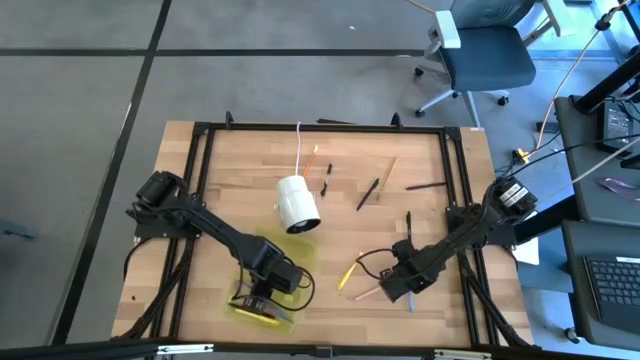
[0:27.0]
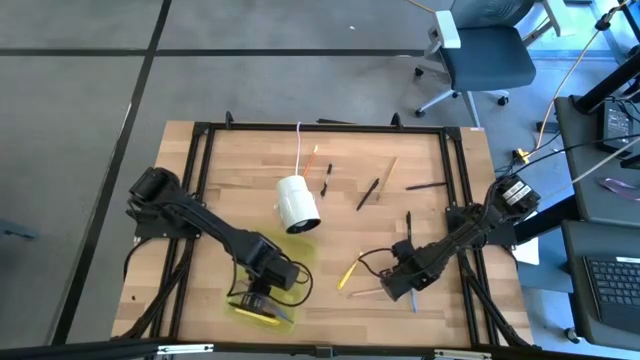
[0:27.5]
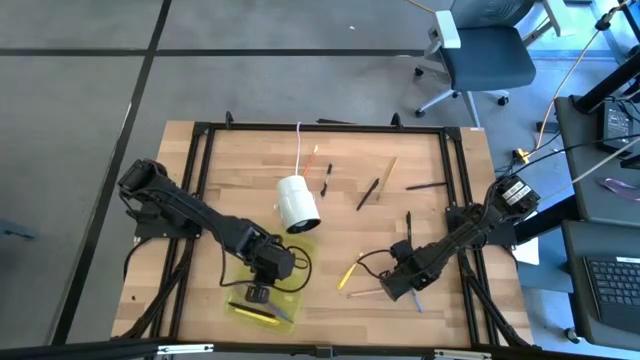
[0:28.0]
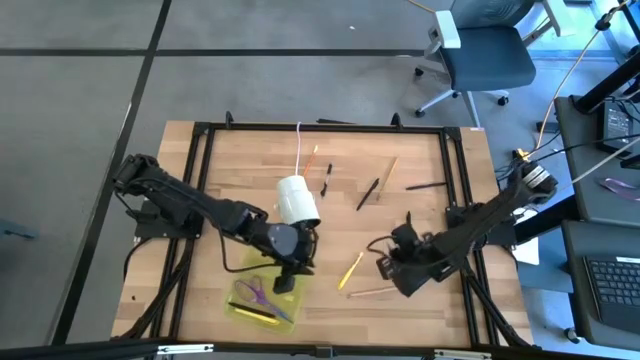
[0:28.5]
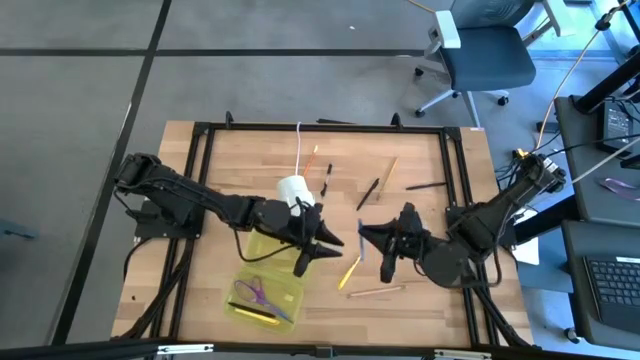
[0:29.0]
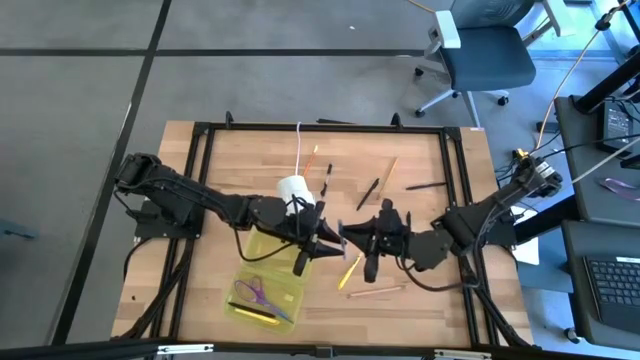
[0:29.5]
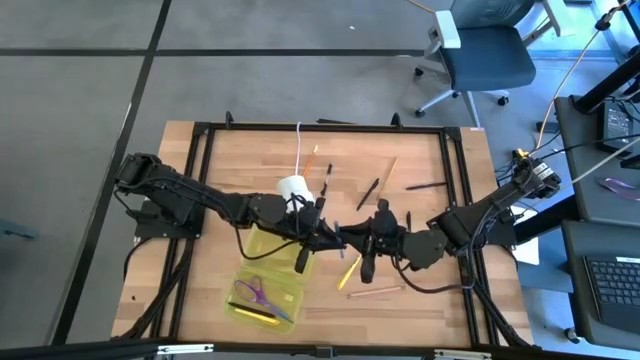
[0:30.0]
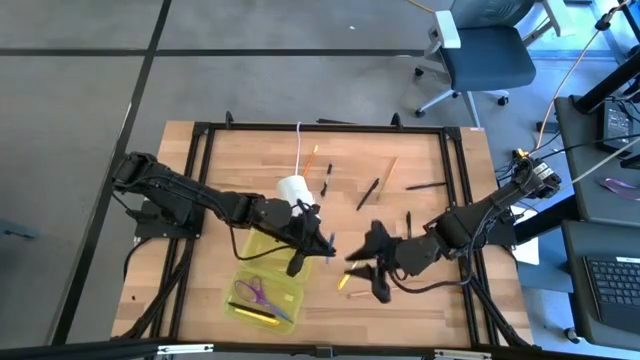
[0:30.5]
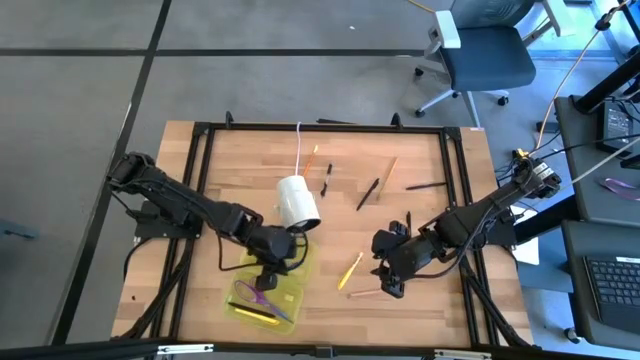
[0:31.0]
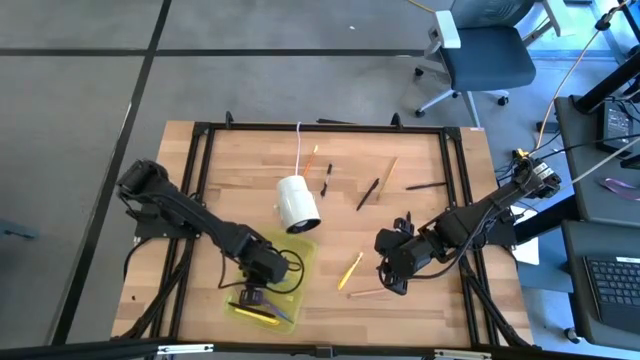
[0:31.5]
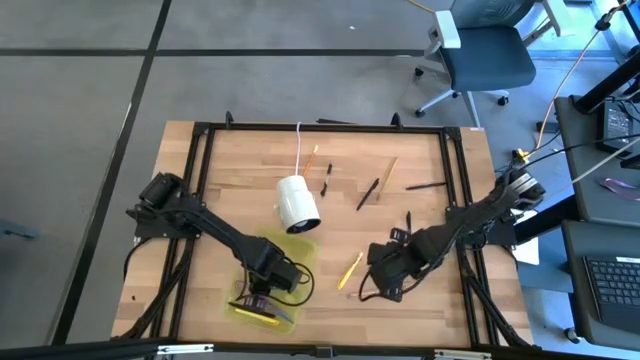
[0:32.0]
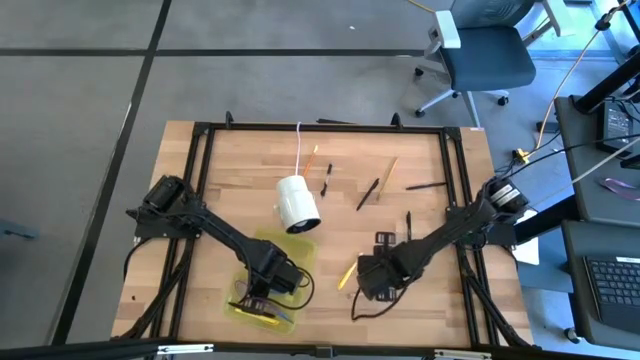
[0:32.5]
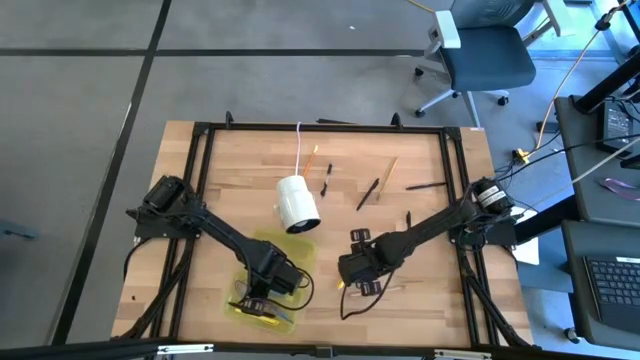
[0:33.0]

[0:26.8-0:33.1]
Task: Pick & place school supplies into a supply box
Put the blue pen into the supply box

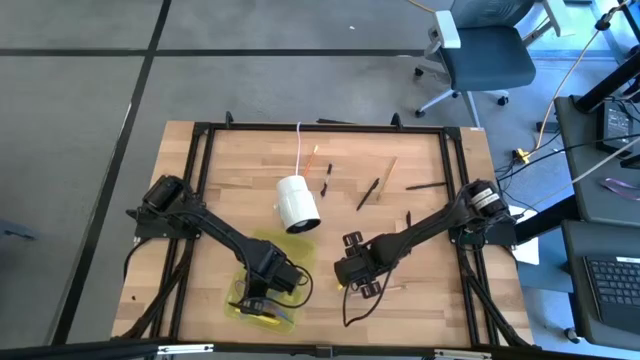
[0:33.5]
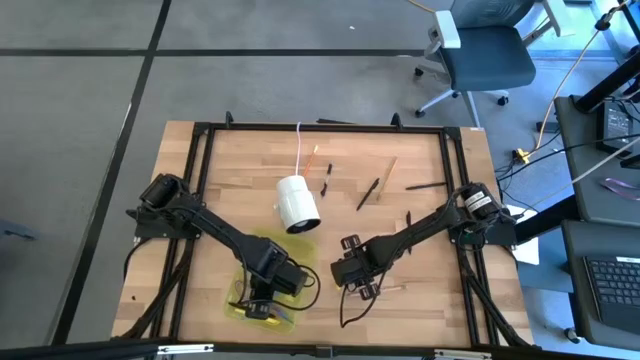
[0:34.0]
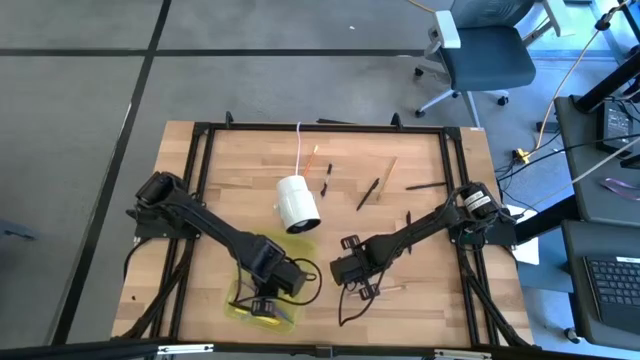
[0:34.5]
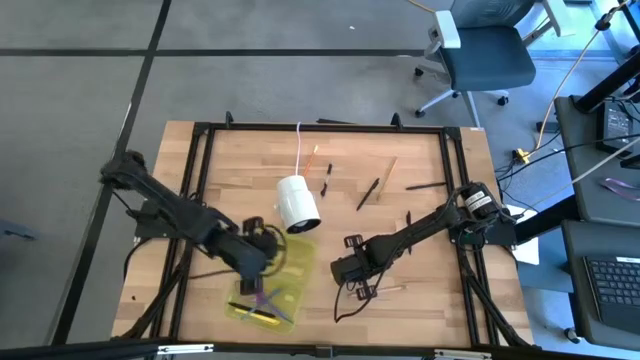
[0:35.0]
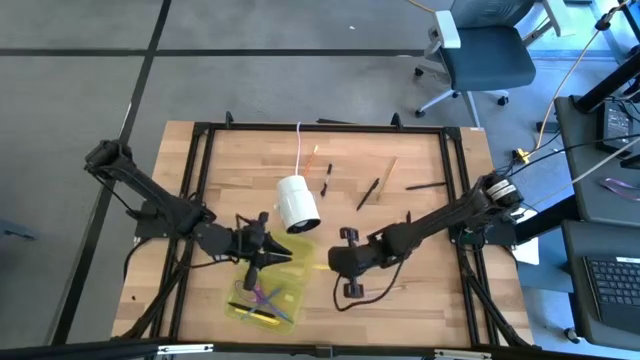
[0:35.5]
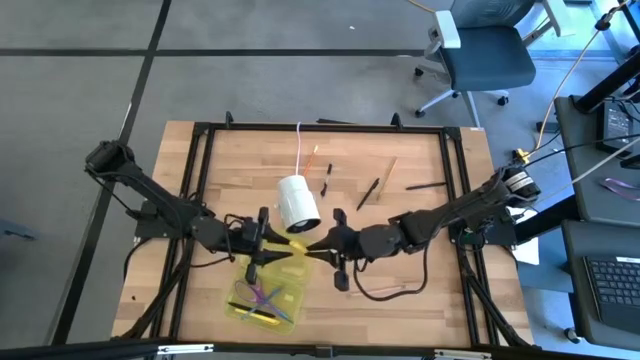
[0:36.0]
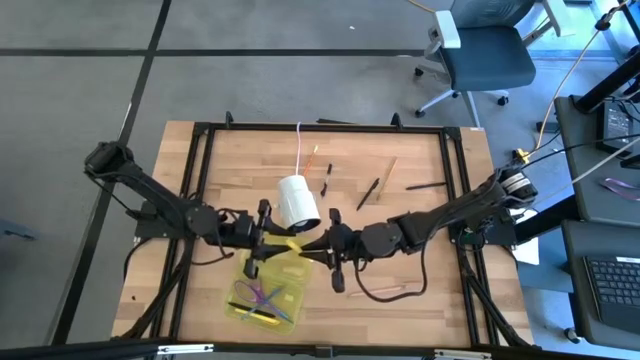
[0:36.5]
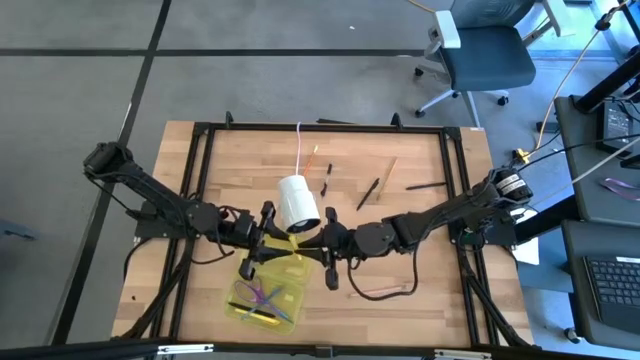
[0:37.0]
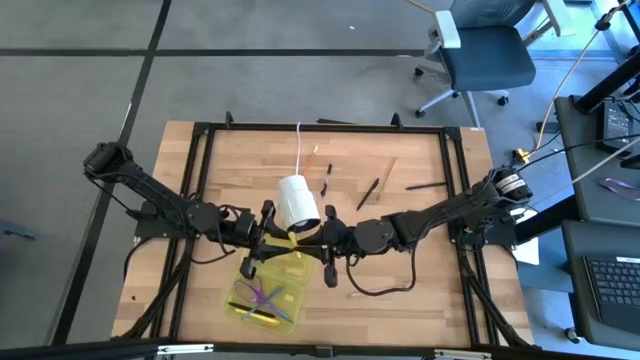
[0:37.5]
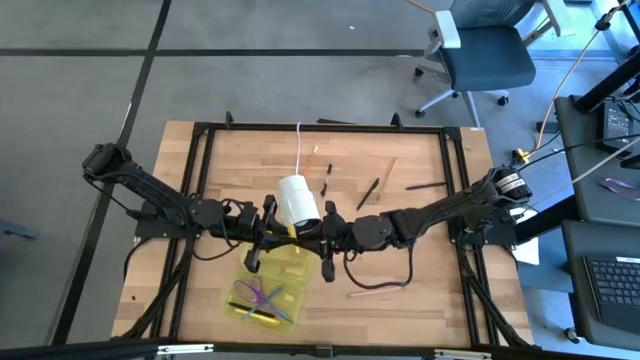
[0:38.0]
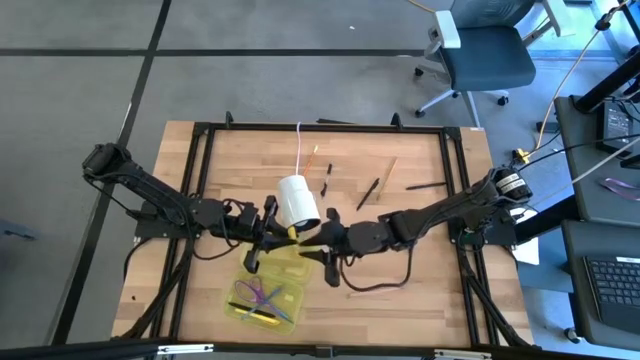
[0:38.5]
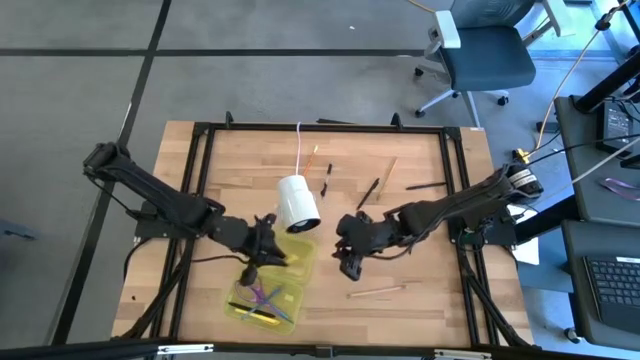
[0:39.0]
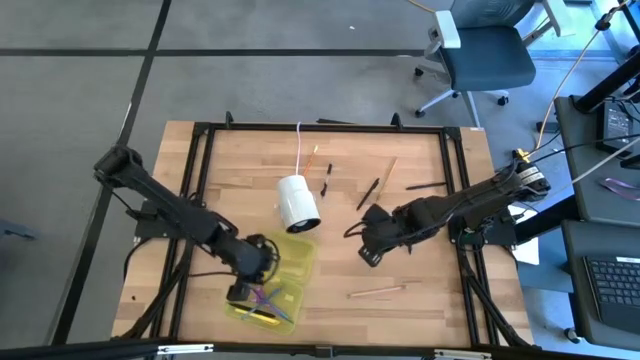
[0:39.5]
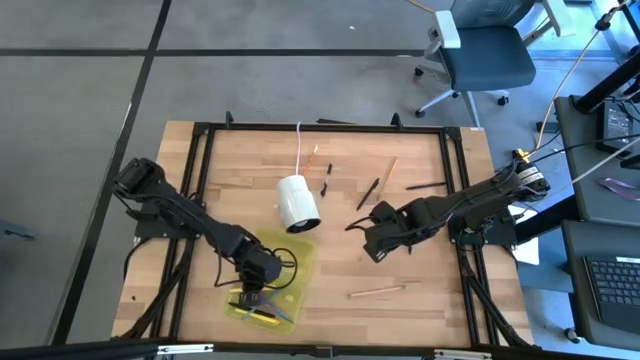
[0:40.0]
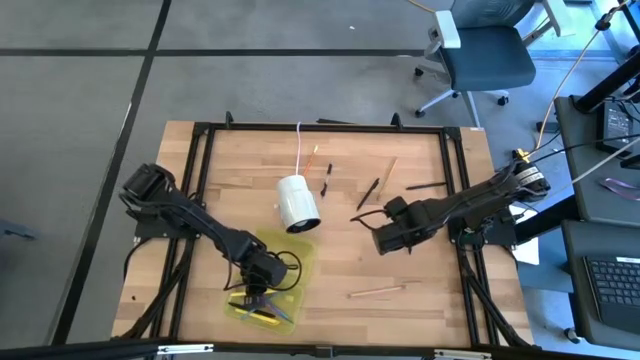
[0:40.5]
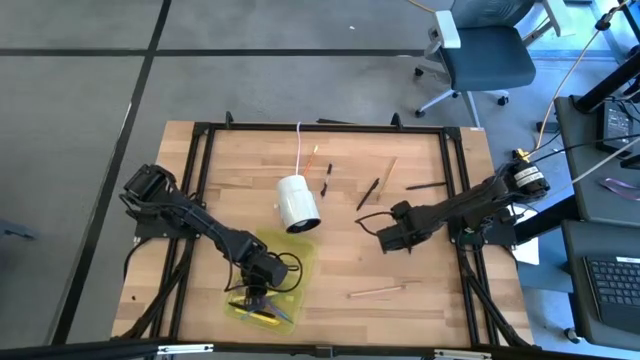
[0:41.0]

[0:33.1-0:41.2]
Put the yellow pen into the supply box

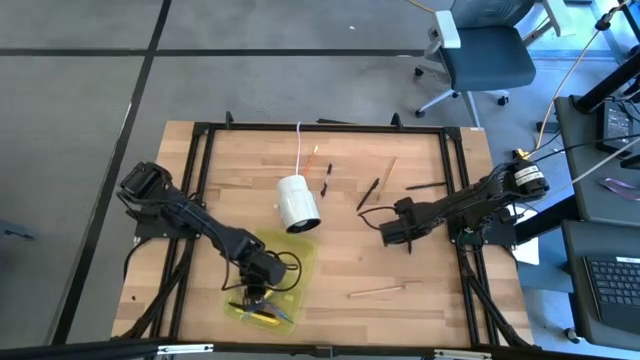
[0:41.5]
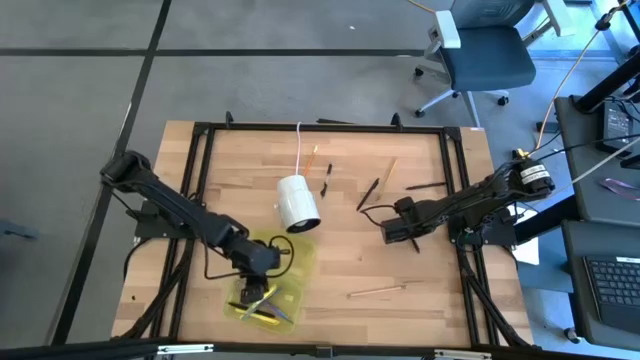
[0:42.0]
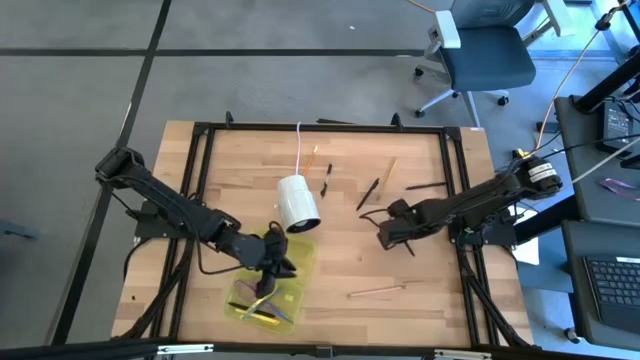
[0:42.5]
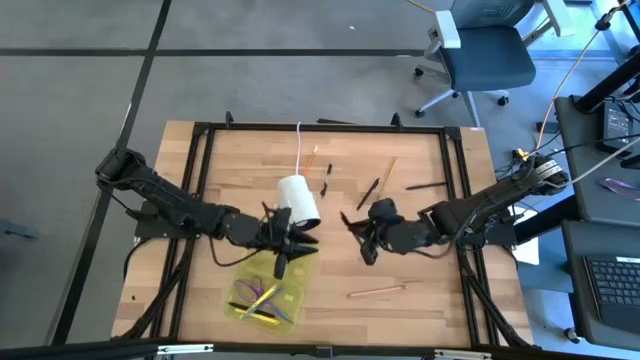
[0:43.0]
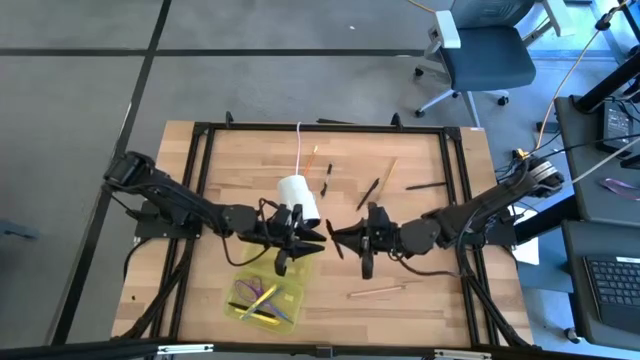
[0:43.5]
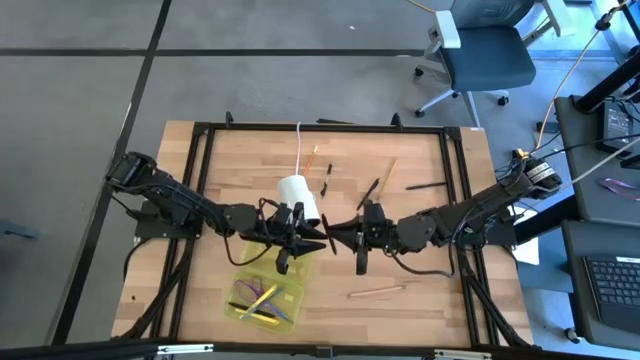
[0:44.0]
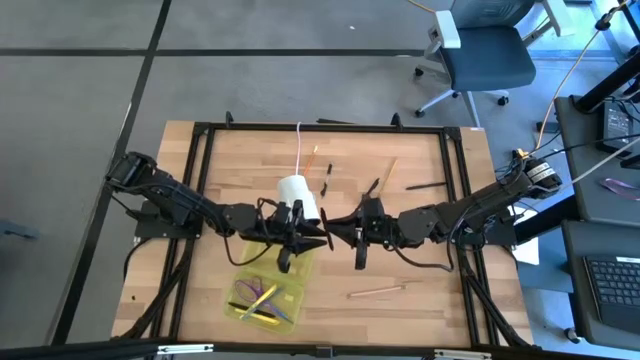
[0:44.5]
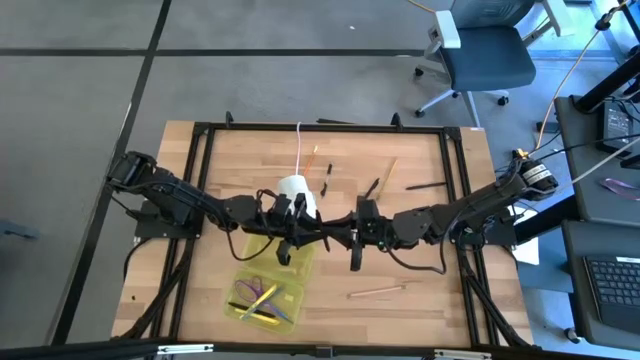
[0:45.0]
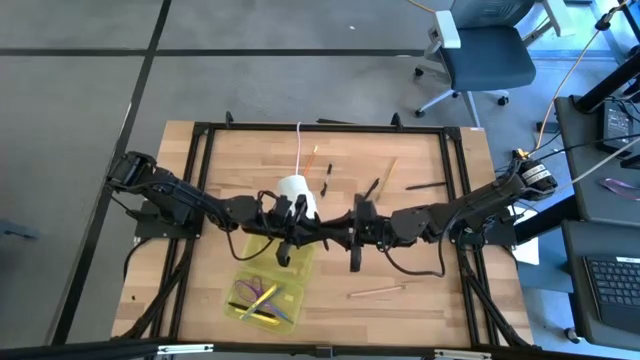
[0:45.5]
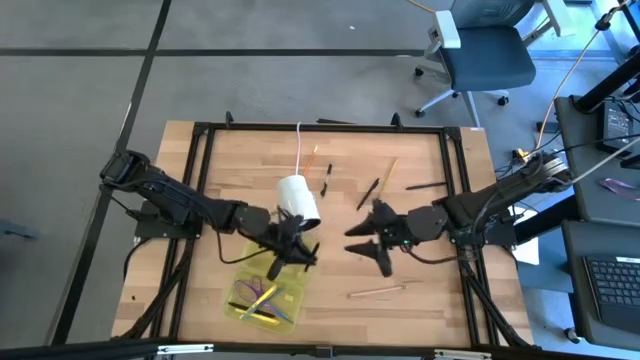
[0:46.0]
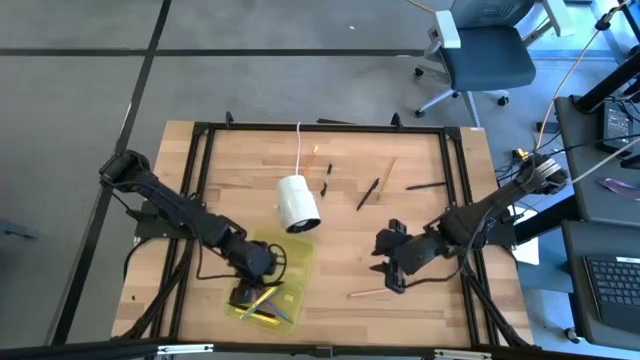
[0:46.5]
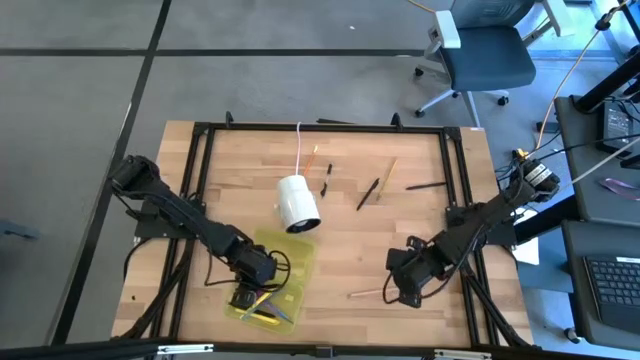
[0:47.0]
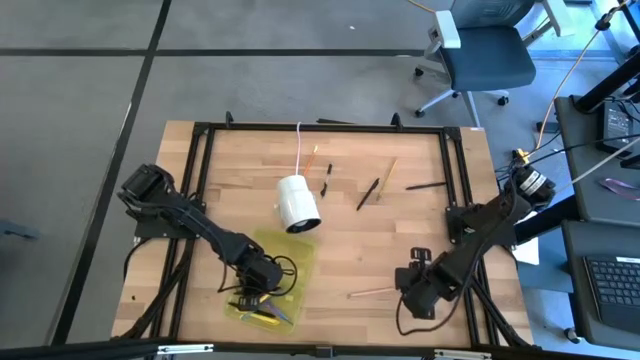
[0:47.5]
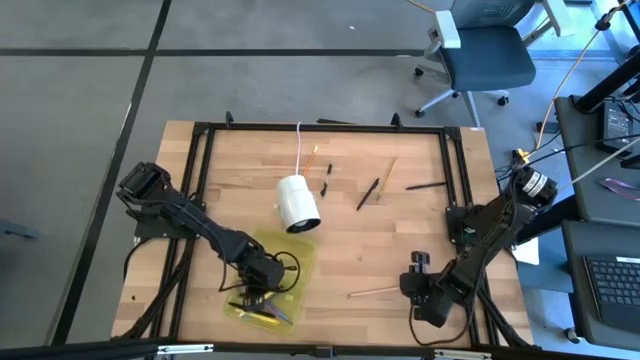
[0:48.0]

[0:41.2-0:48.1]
Put the black pen into the supply box
